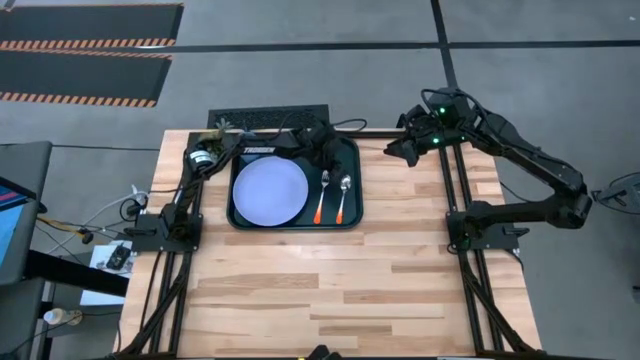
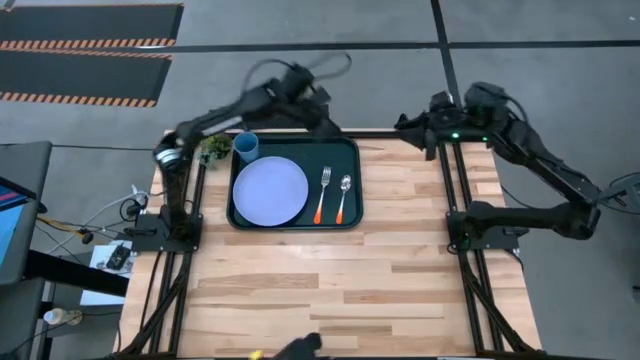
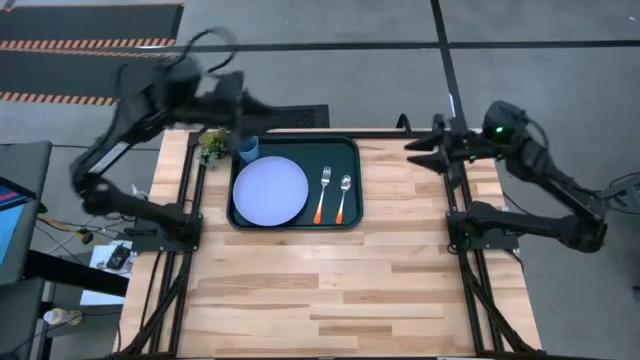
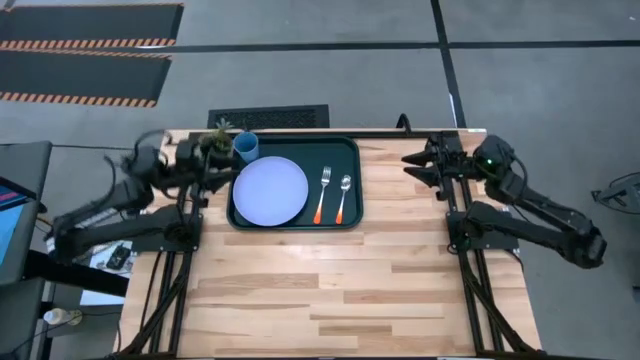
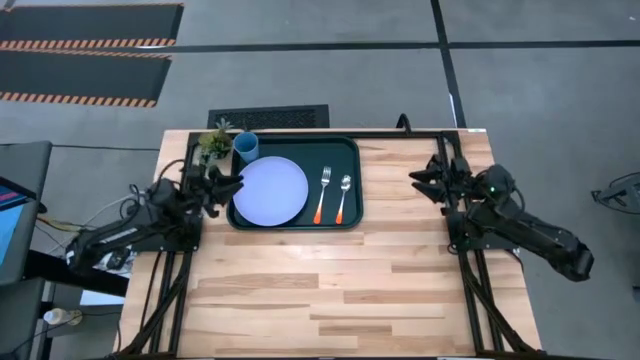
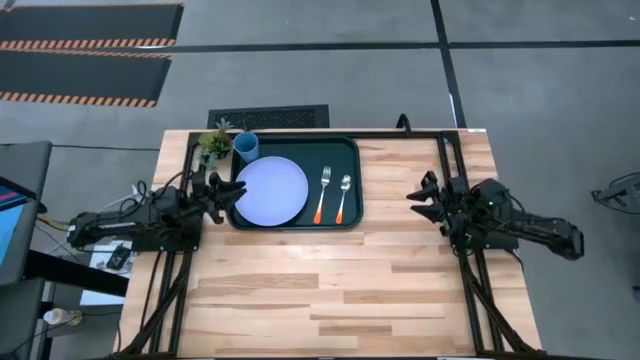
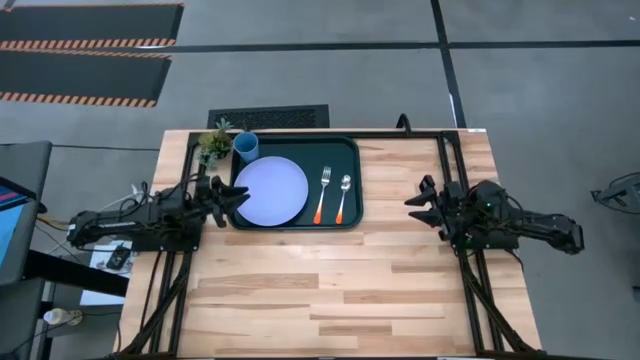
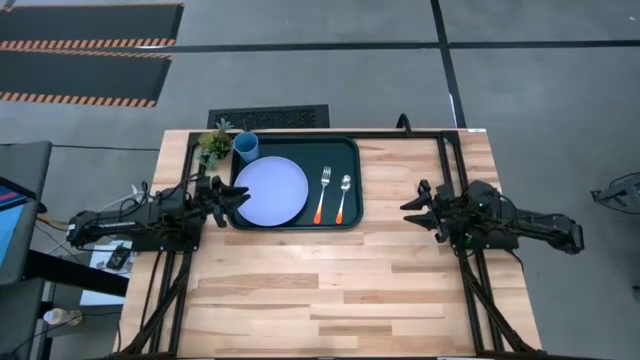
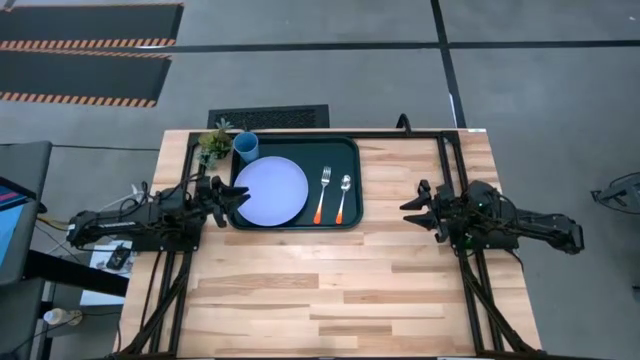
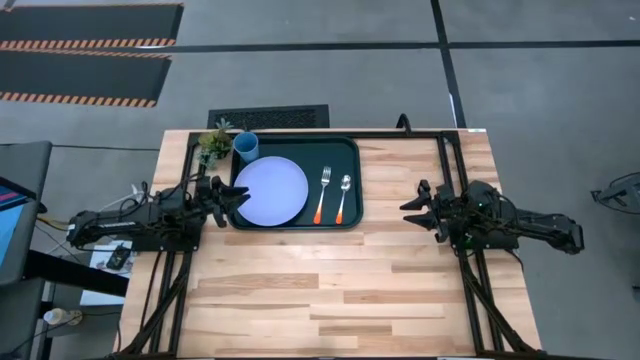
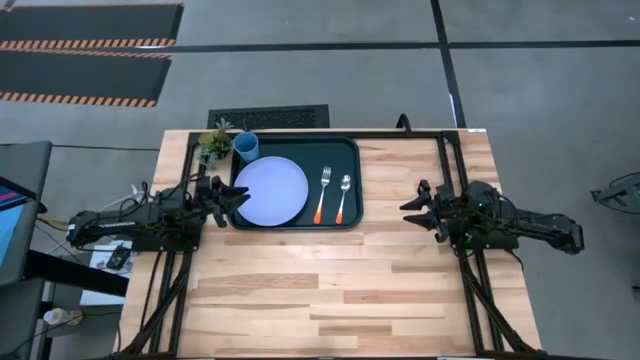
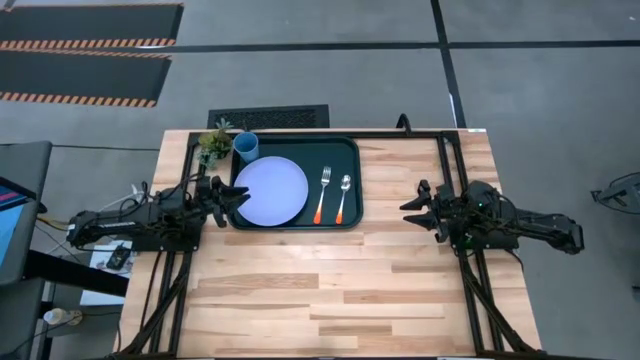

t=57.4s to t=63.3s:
Task: Pick and place plate/cup/fork/spoon on tray
Return to Home Position

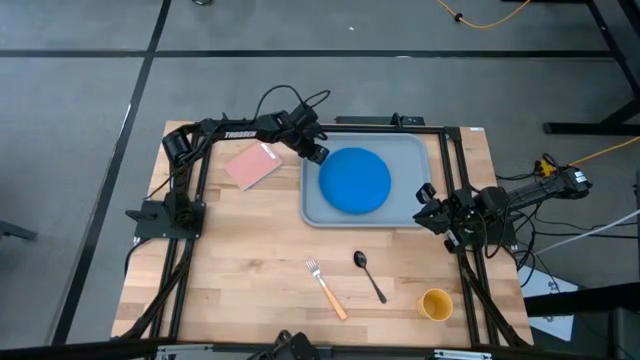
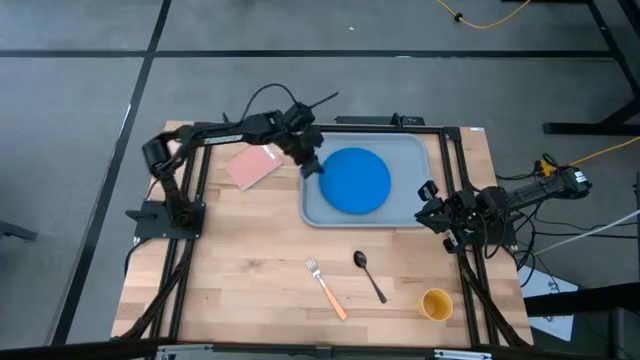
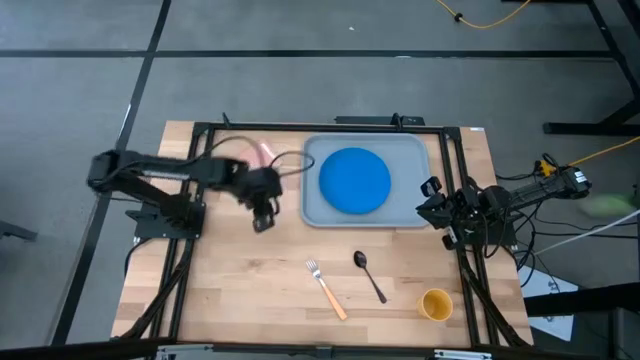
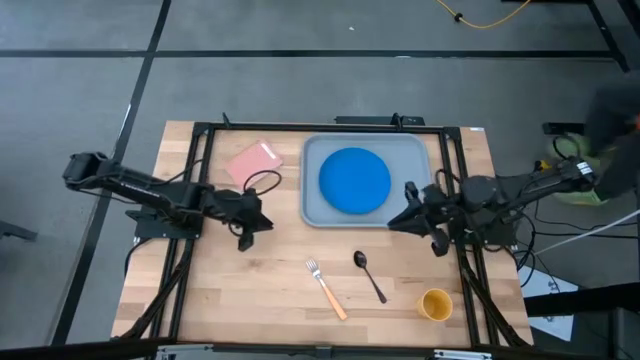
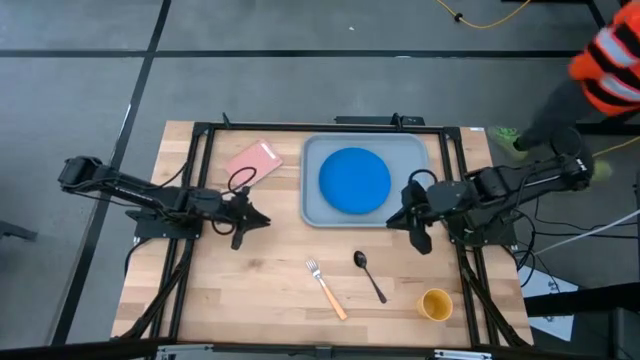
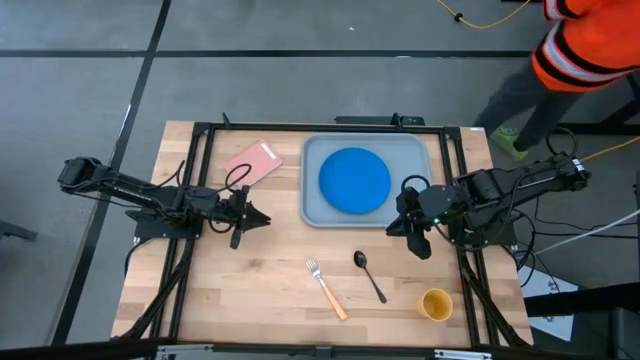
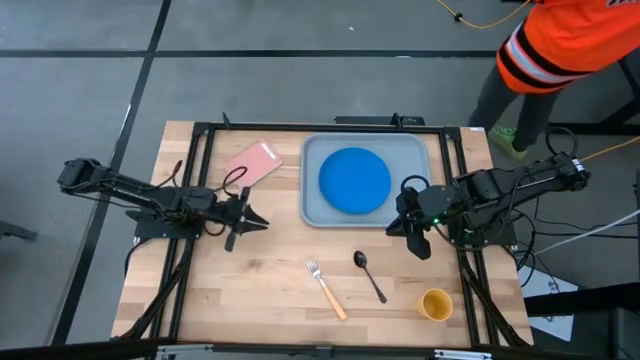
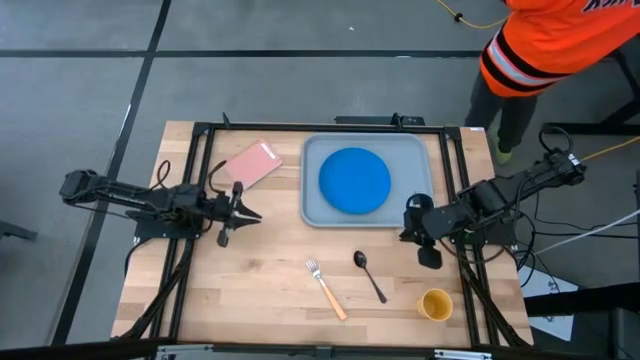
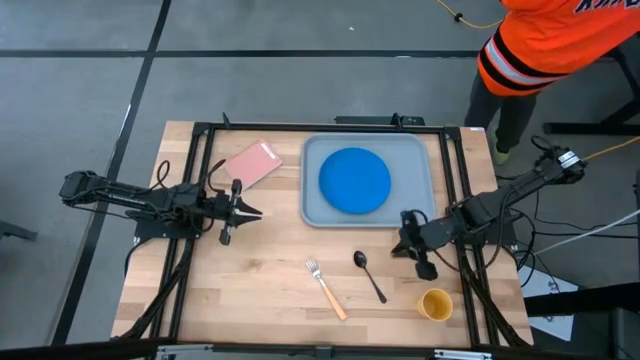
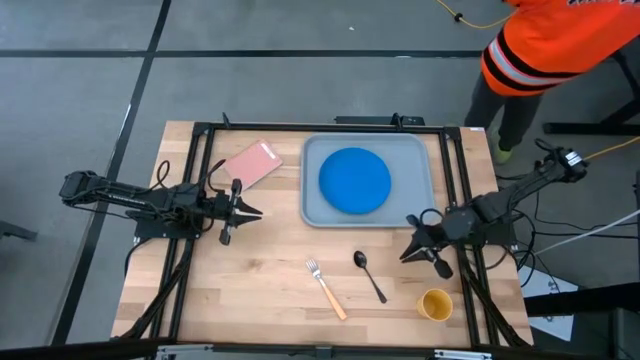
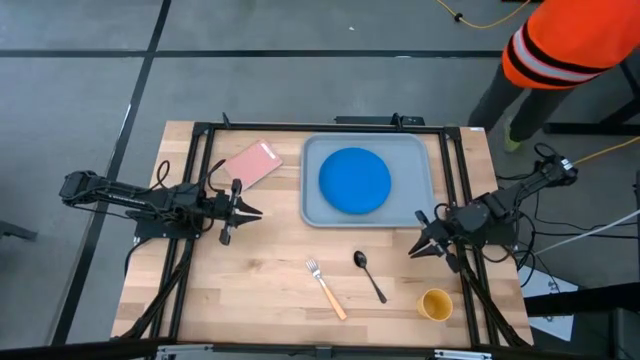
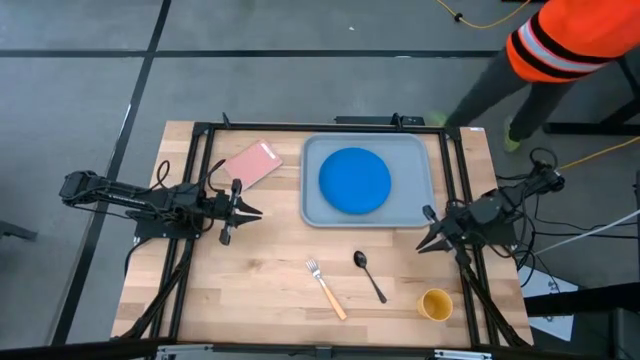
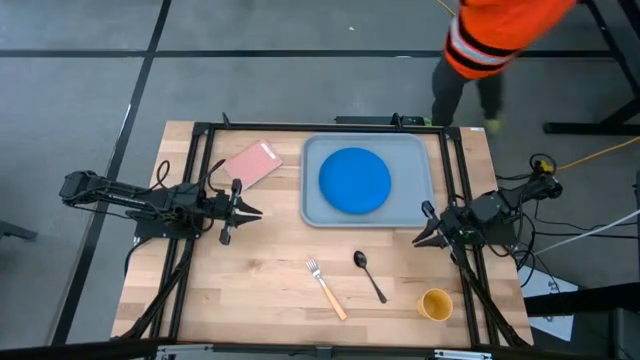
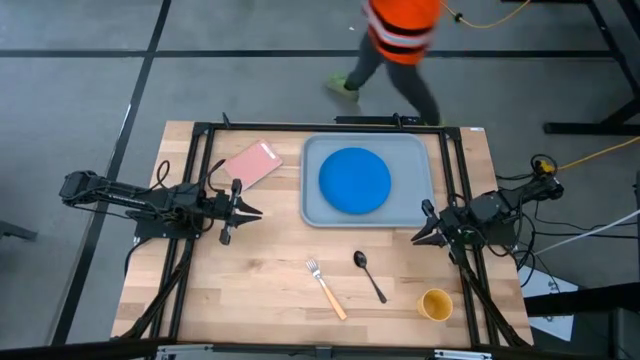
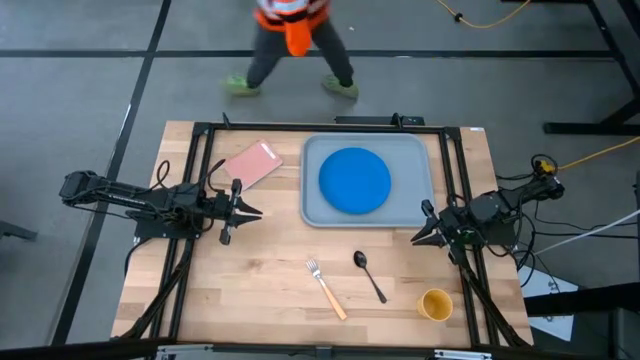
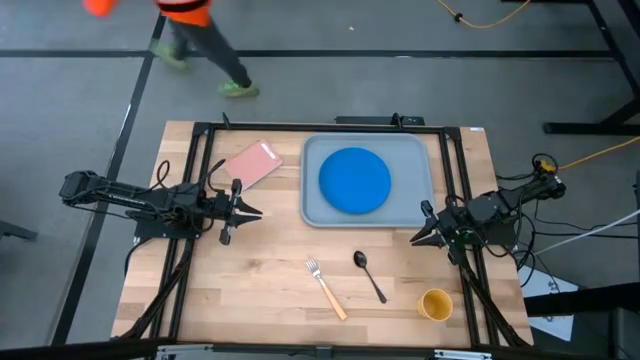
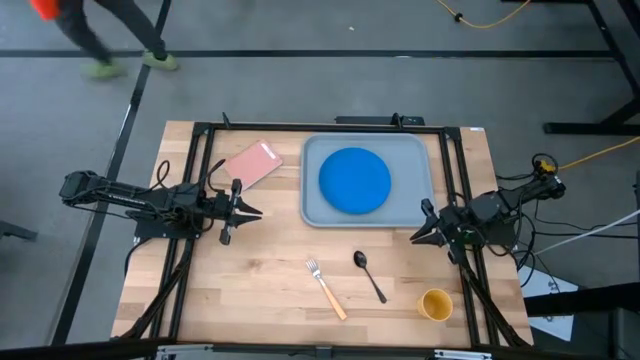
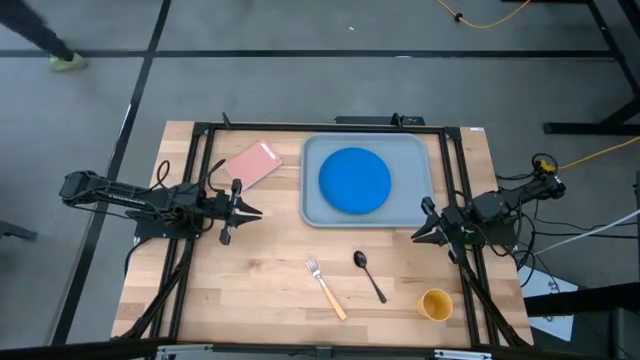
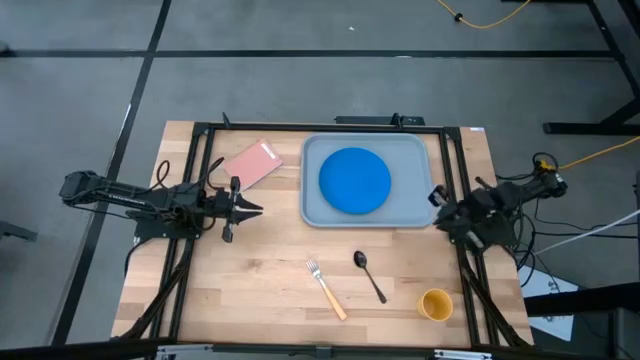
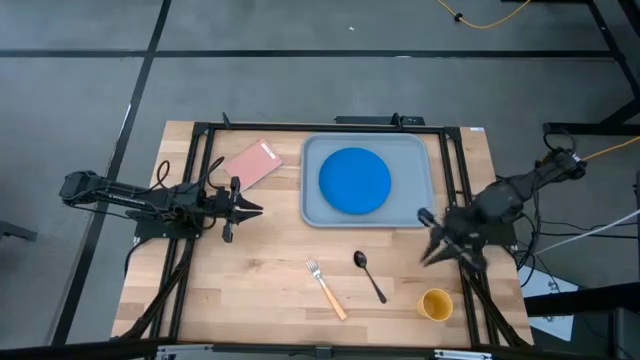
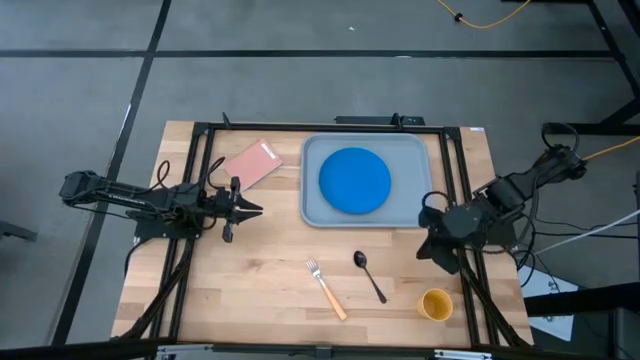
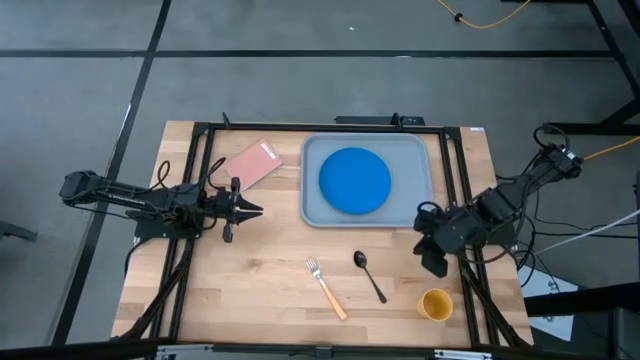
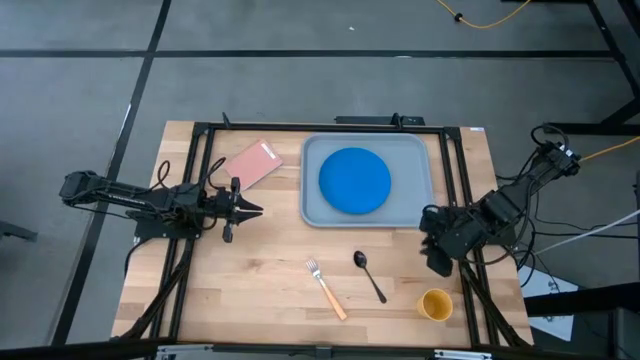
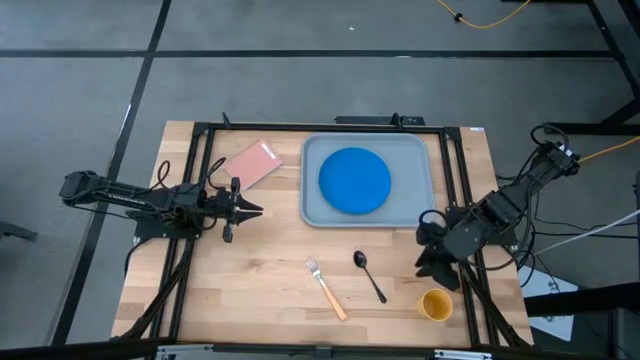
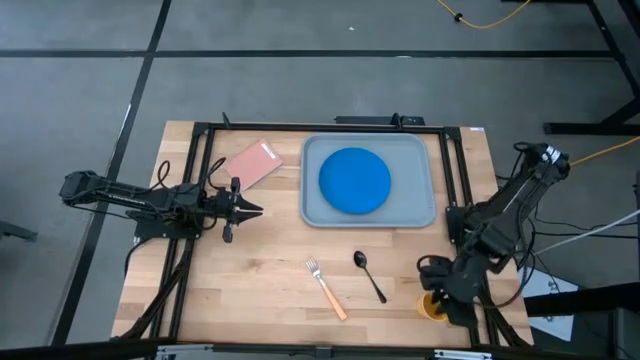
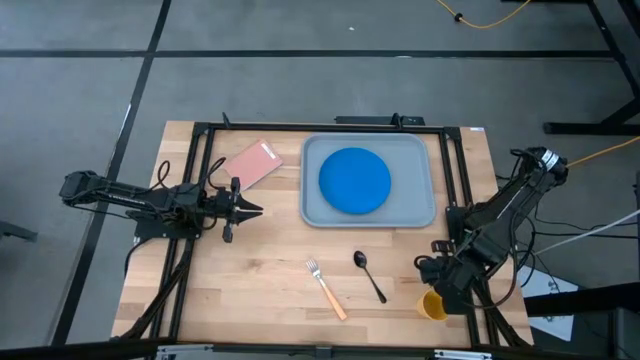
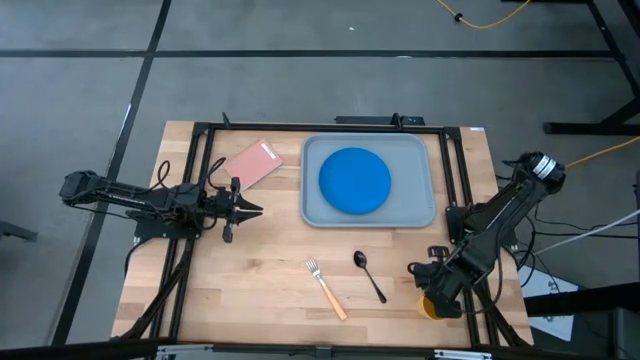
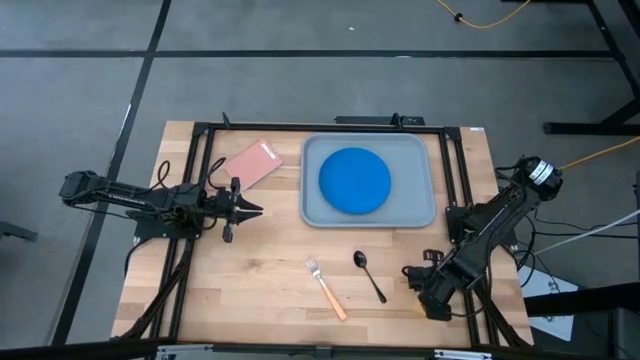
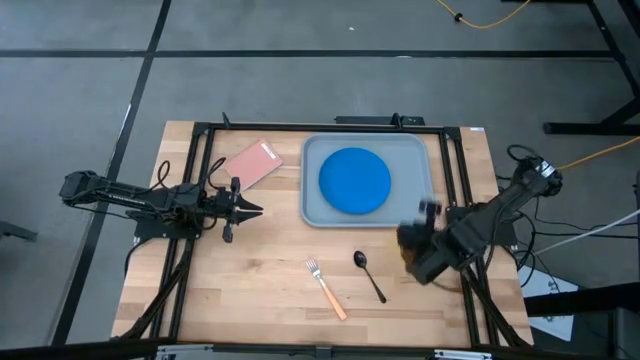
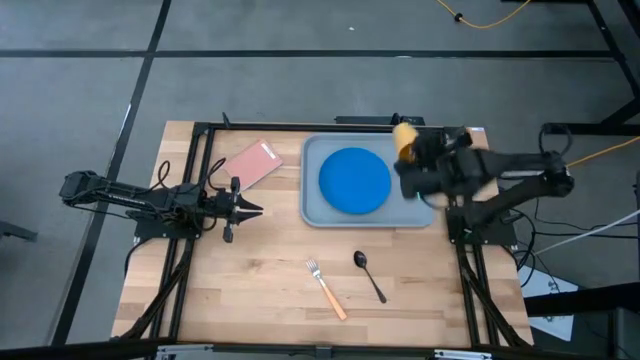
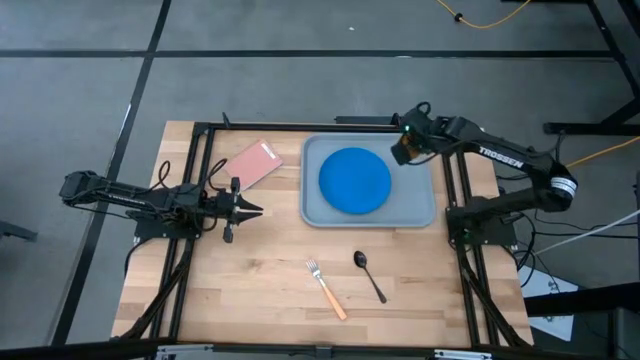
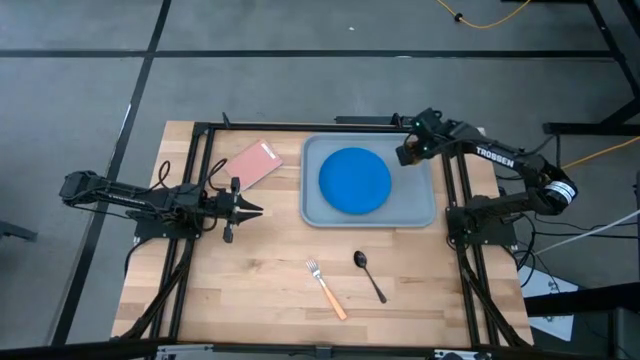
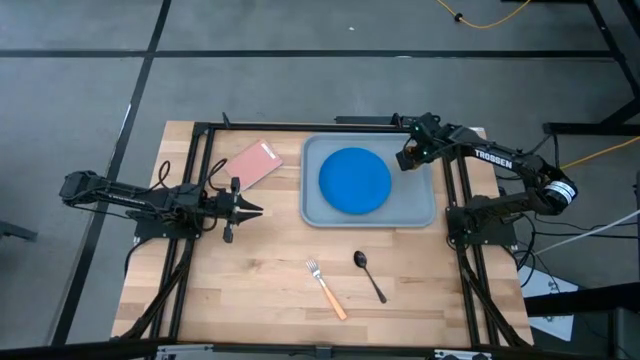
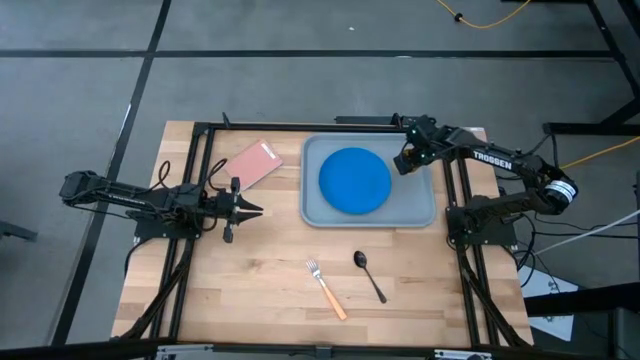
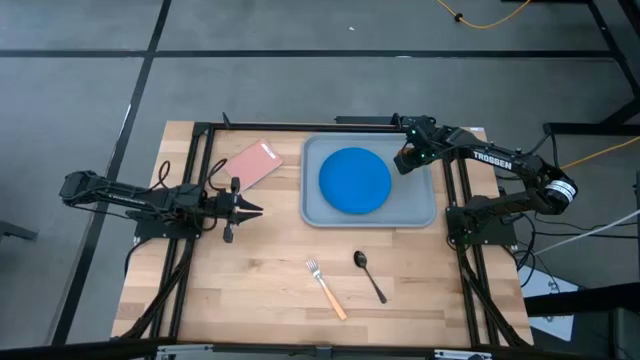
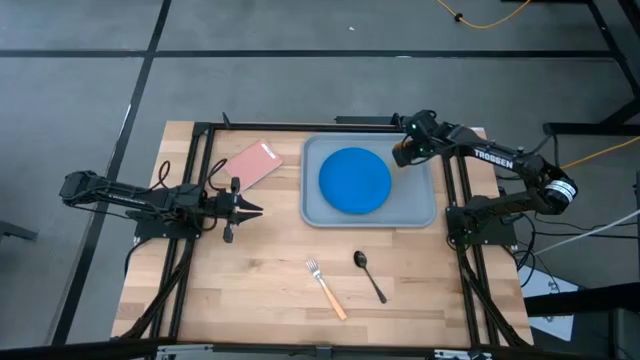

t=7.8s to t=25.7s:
Task: Pick and place plate/cup/fork/spoon on tray
Put the cup on the gray tray
